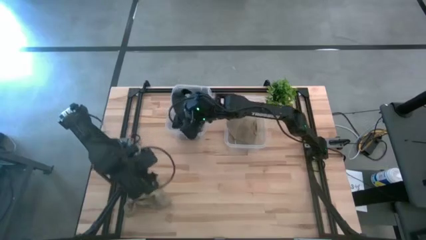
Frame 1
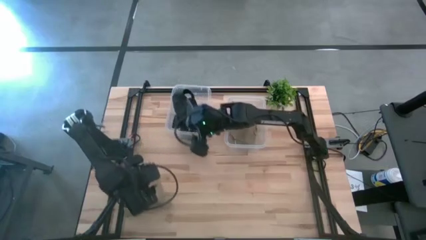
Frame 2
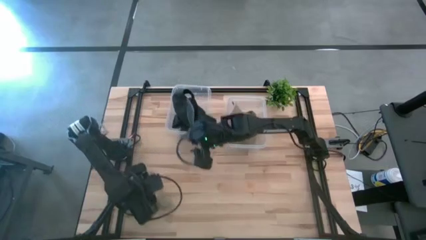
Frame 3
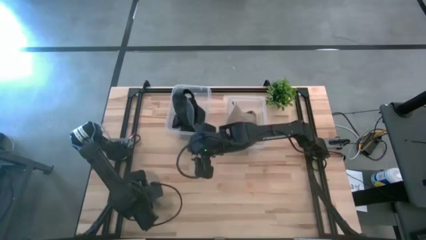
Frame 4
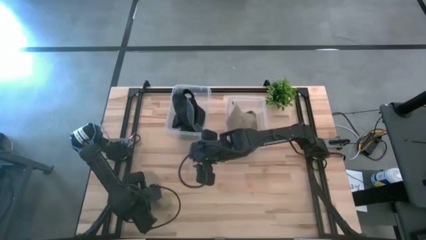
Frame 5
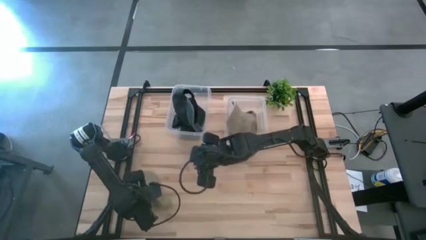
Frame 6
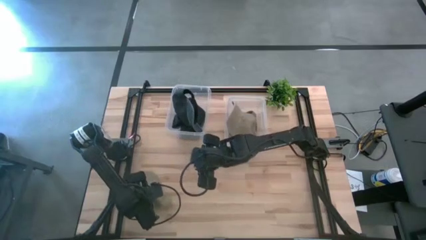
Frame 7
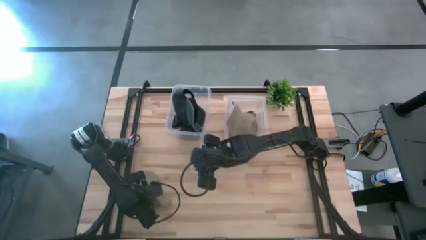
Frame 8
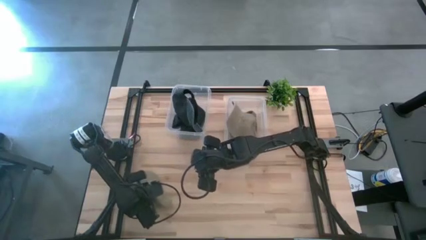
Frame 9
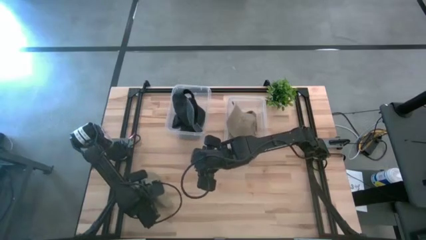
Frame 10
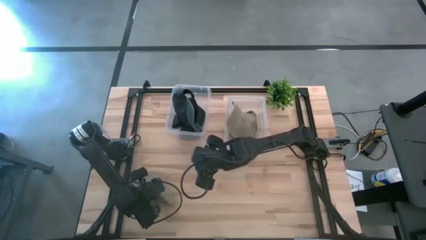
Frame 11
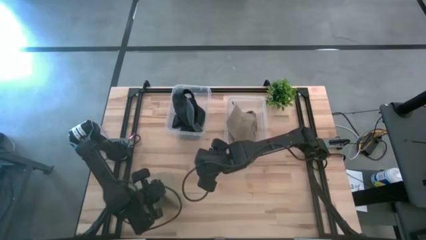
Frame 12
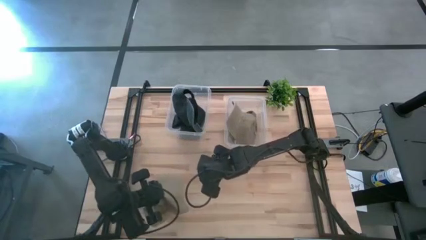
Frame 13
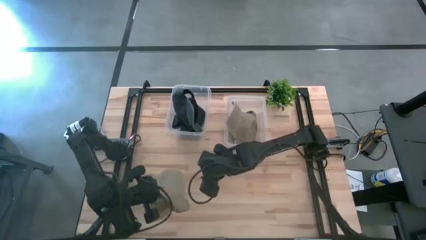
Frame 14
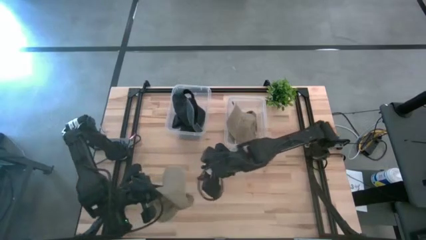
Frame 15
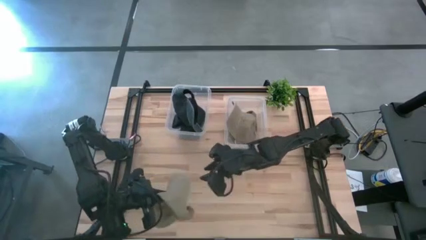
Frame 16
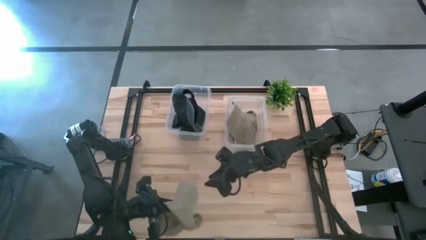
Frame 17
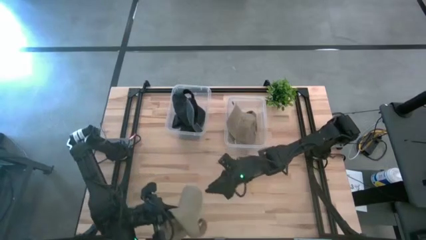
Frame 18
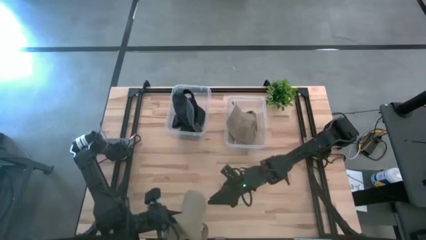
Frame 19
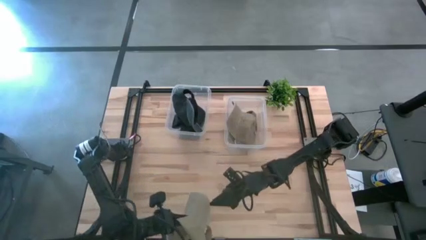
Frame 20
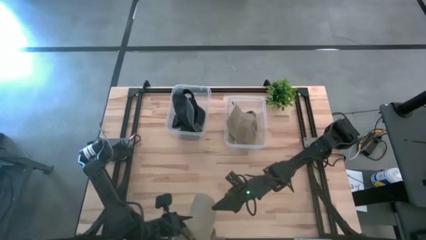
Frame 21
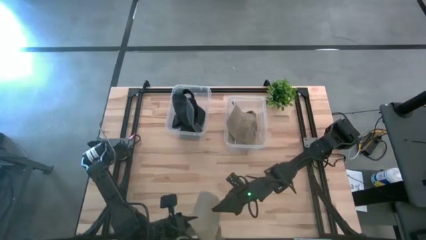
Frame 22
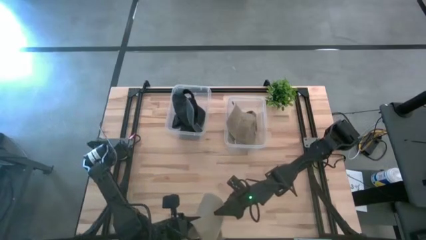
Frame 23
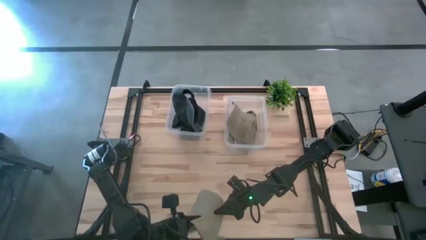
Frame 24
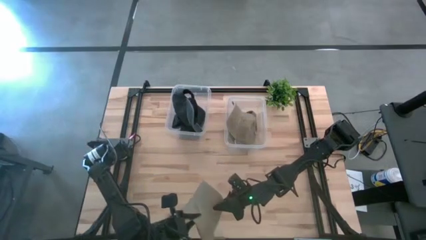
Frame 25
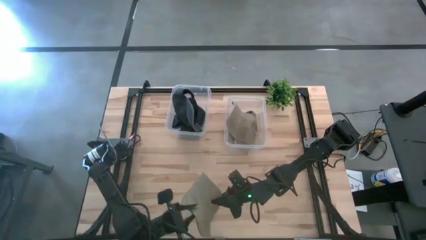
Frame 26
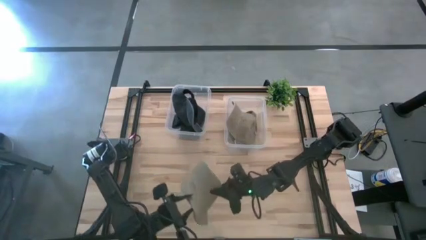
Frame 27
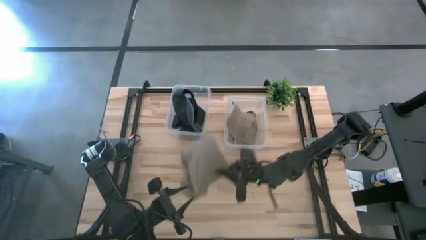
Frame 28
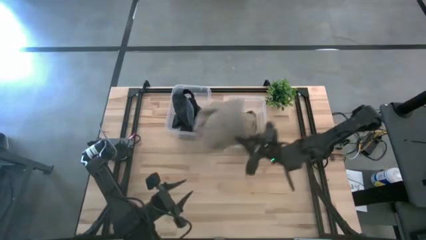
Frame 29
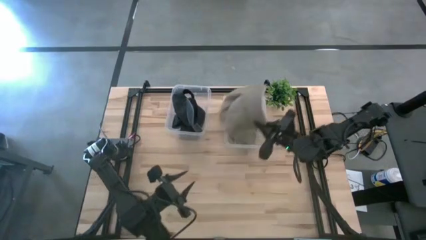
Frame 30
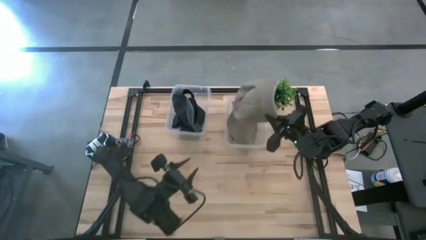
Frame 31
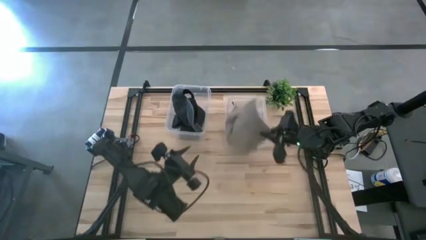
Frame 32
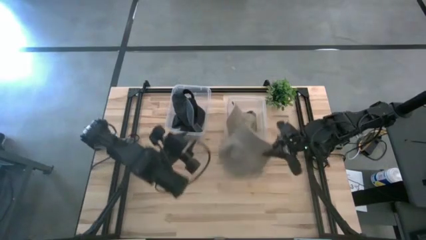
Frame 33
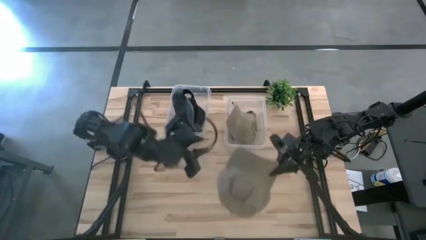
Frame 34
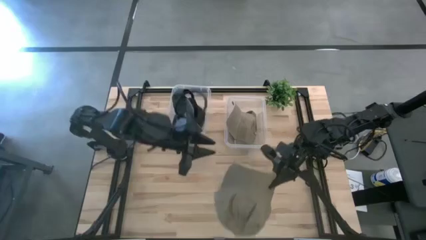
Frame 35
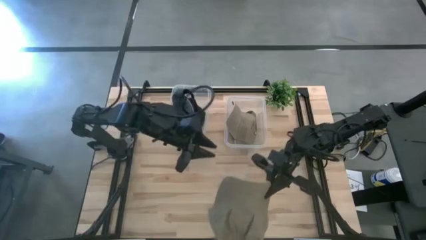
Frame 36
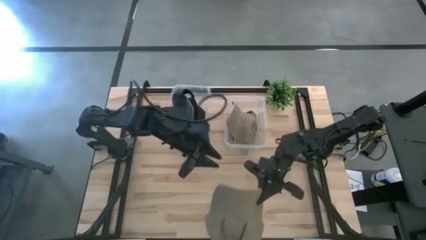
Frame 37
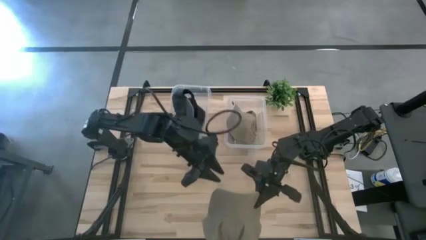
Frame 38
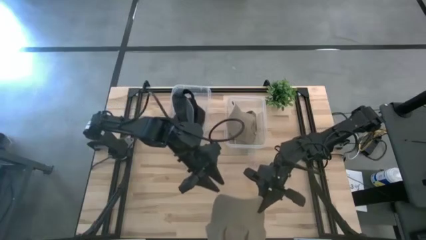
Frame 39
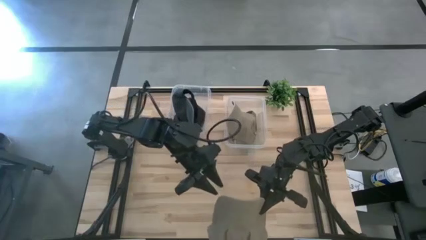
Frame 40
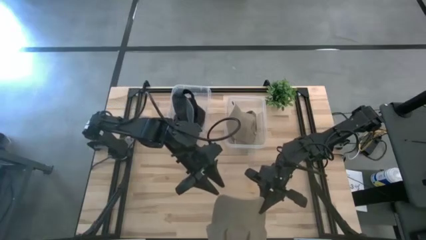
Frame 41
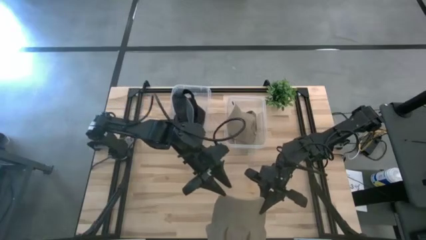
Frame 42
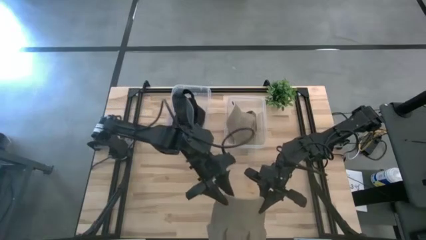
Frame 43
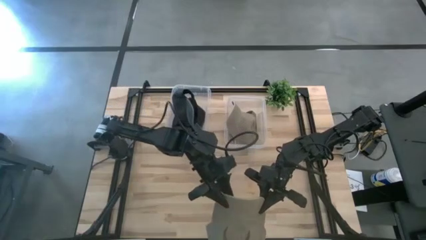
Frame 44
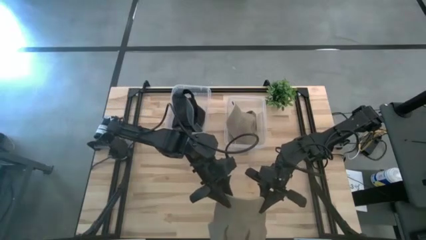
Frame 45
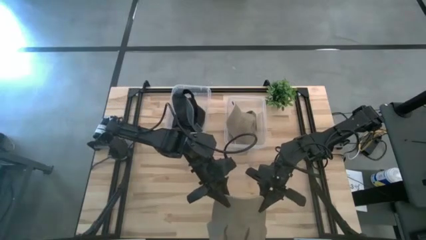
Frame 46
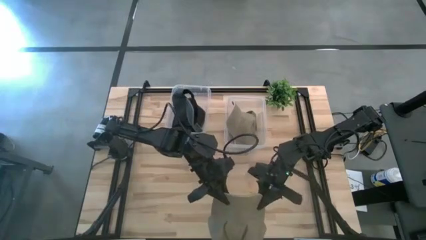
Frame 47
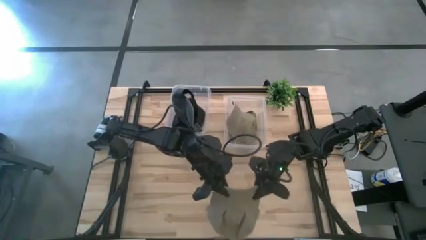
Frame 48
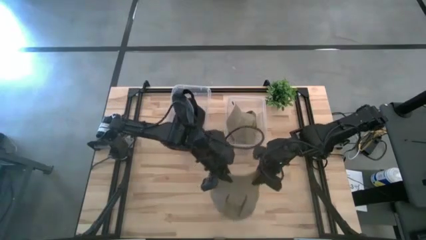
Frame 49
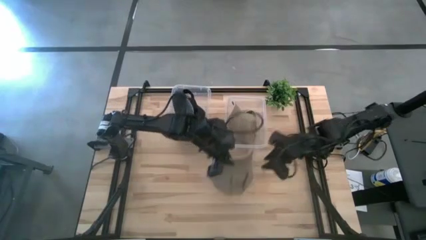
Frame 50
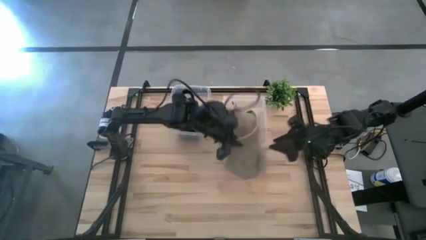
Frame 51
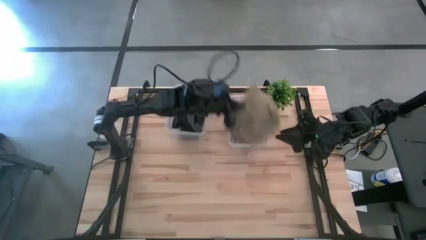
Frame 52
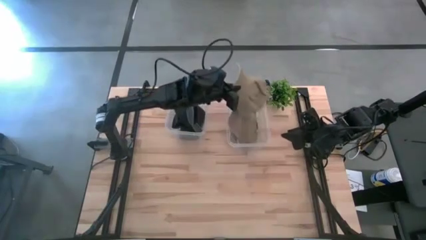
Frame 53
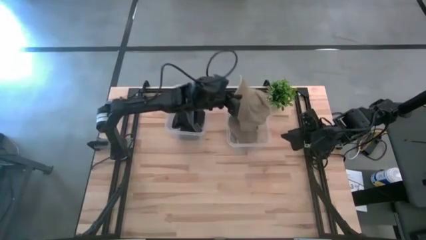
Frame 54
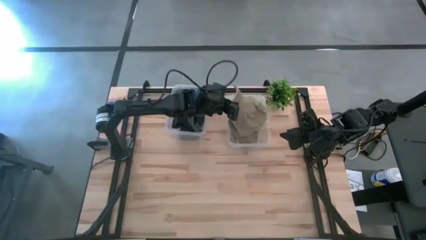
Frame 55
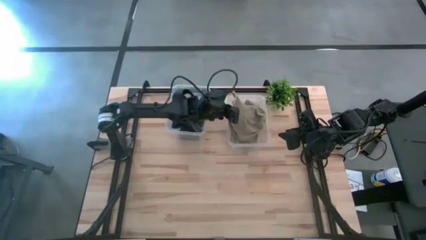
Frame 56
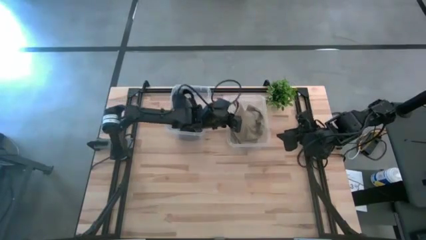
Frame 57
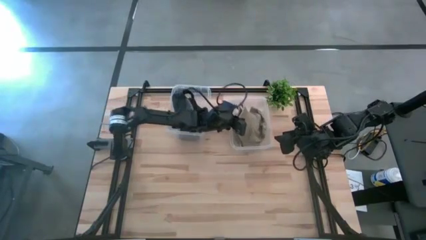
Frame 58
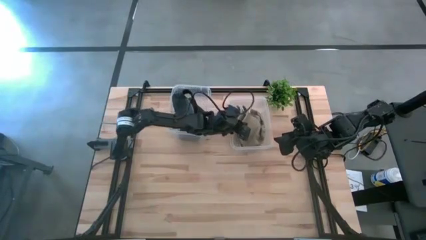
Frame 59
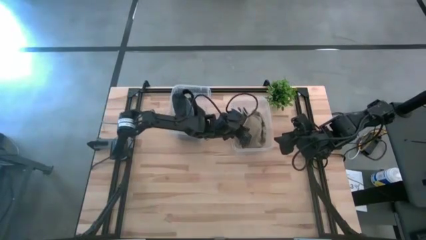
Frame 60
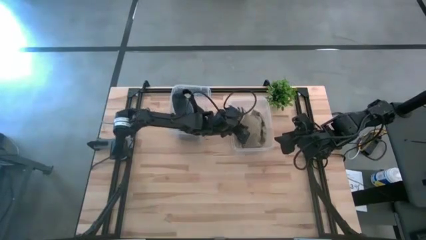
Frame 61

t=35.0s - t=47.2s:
Task: Pick & Place hat
Put the brown cap into the left transparent bin

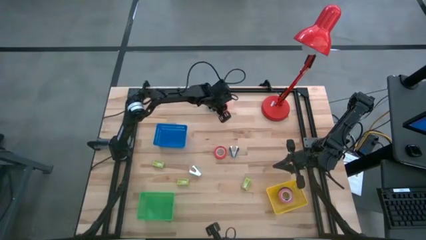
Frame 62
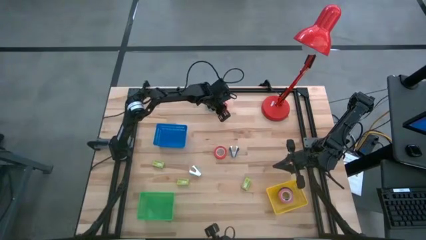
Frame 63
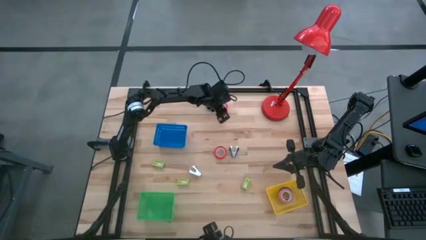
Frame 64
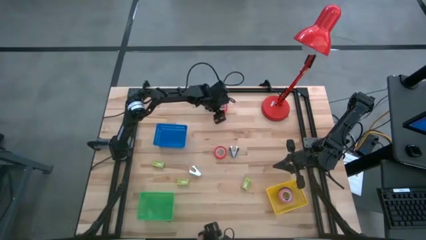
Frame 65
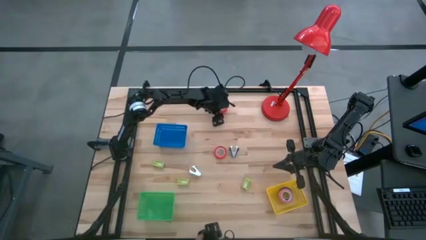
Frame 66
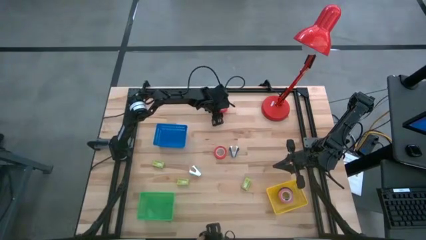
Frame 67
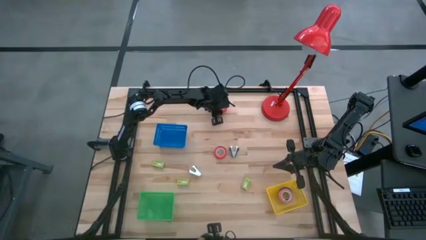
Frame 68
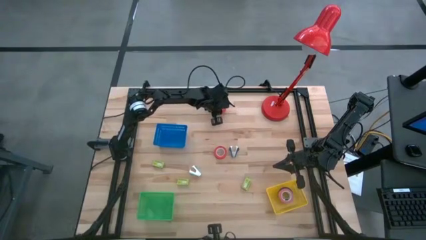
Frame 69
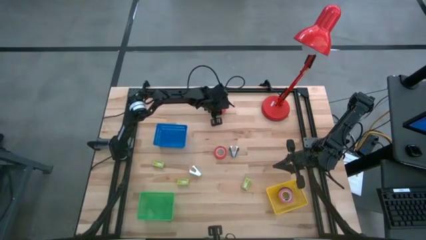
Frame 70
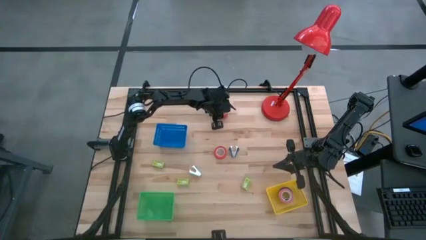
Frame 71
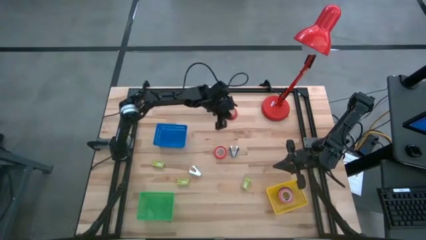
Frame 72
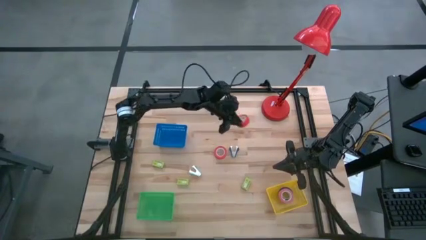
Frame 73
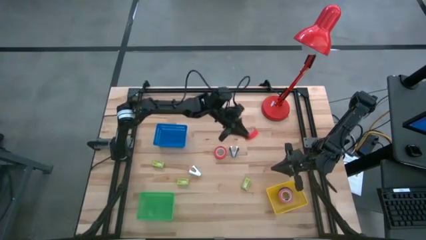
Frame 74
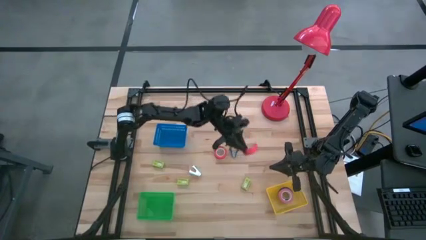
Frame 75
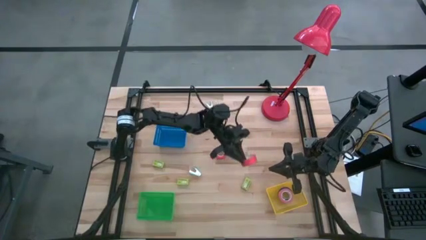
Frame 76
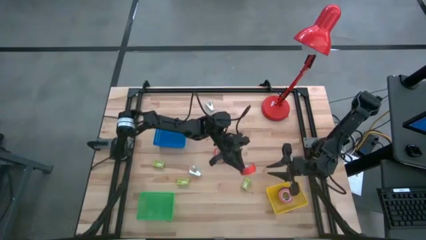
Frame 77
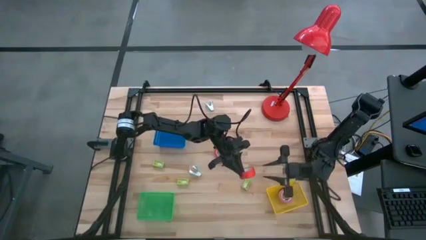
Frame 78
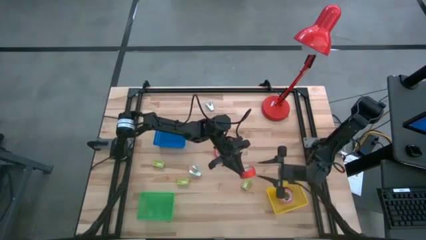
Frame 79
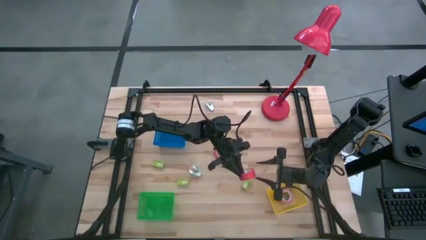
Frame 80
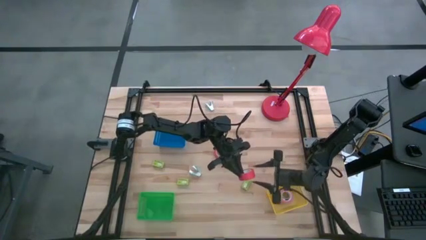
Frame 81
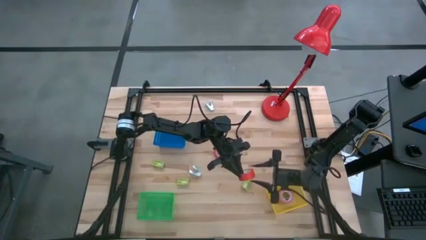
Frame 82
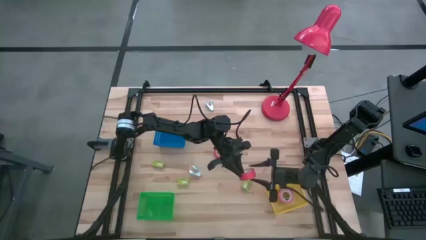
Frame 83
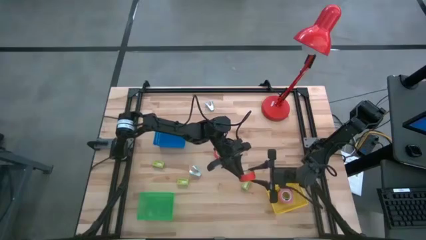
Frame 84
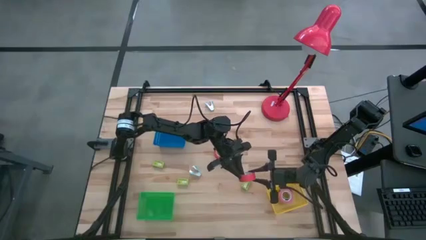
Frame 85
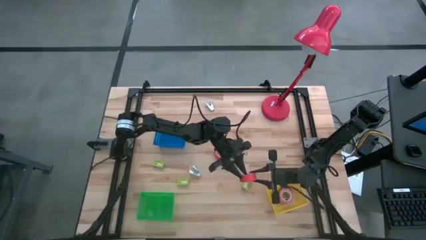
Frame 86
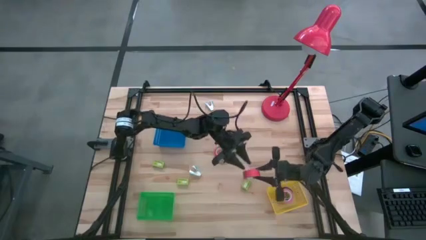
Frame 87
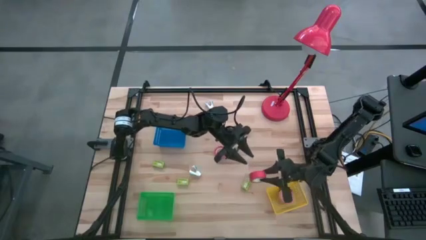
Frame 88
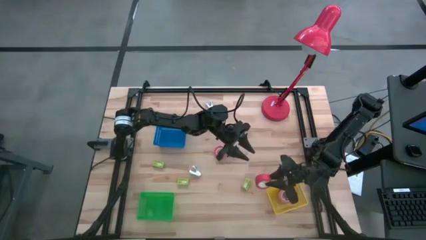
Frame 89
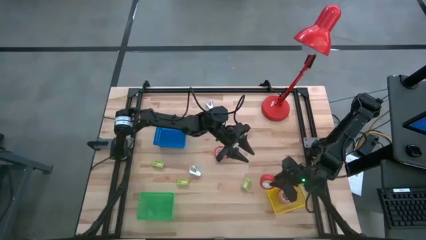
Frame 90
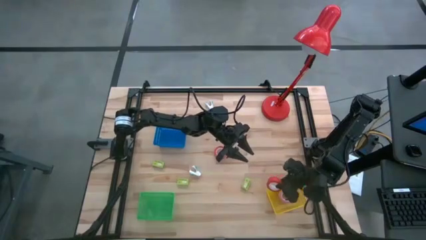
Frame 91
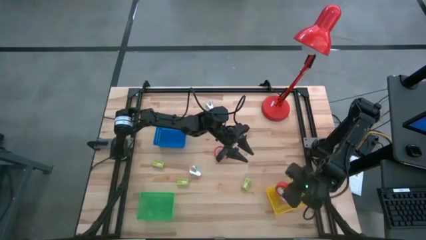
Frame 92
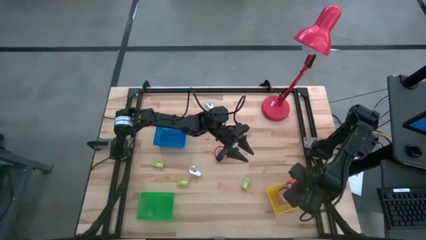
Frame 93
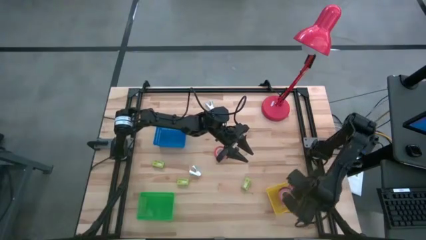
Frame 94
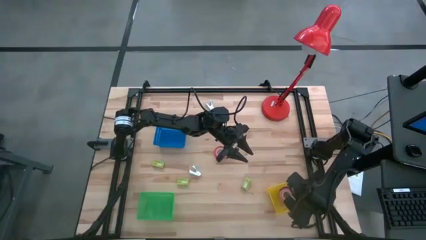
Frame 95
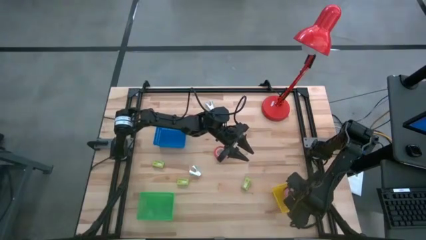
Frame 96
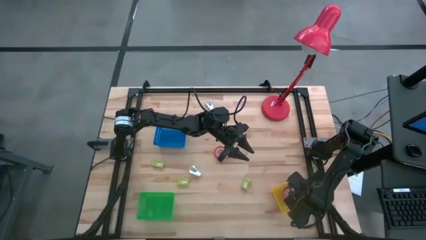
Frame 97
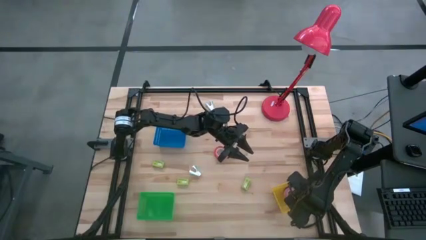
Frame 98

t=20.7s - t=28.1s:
Task: Pick and place Stapler, Stapler remover, tape
Put the top orange tape into the yellow bin
